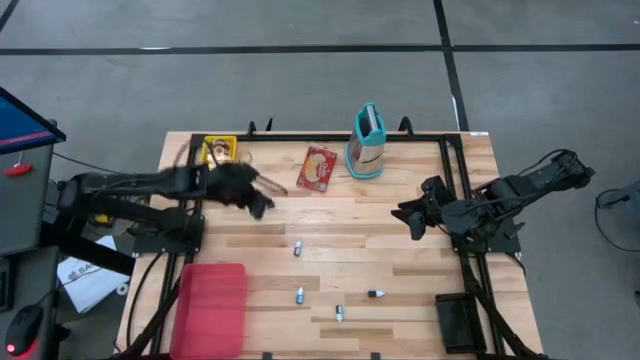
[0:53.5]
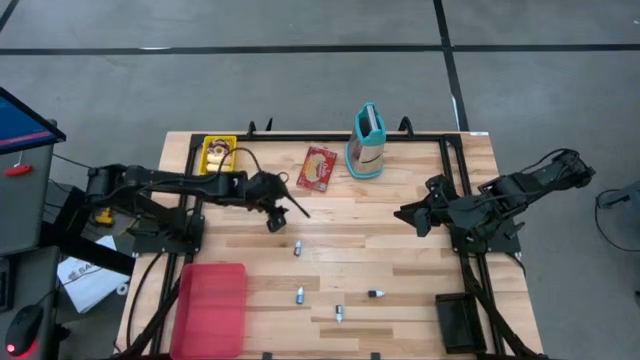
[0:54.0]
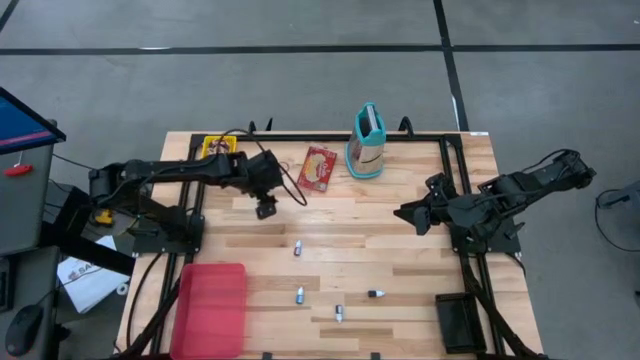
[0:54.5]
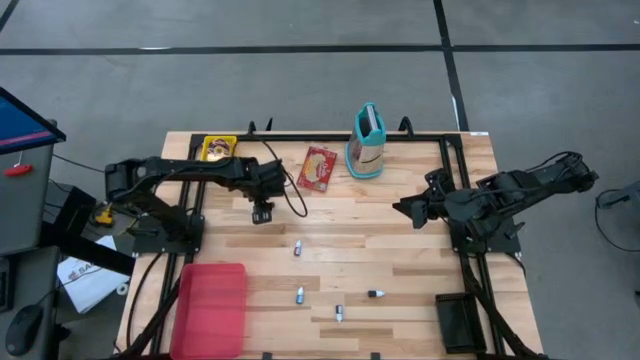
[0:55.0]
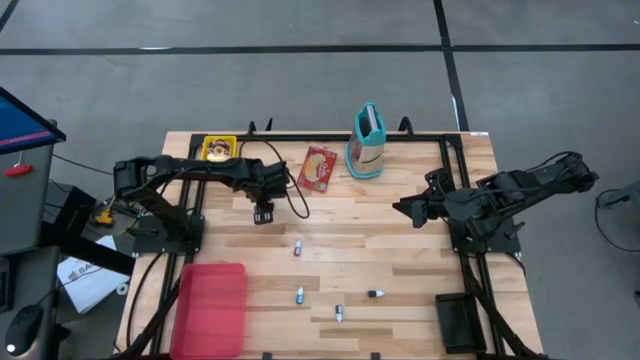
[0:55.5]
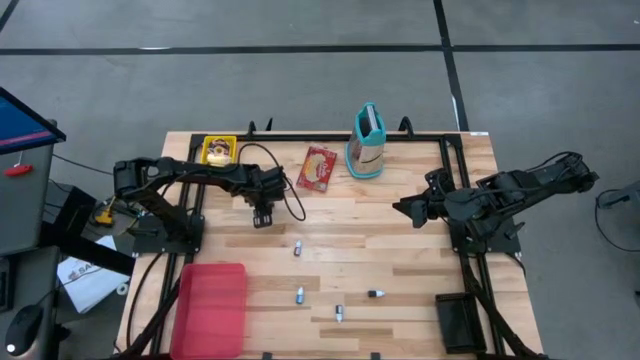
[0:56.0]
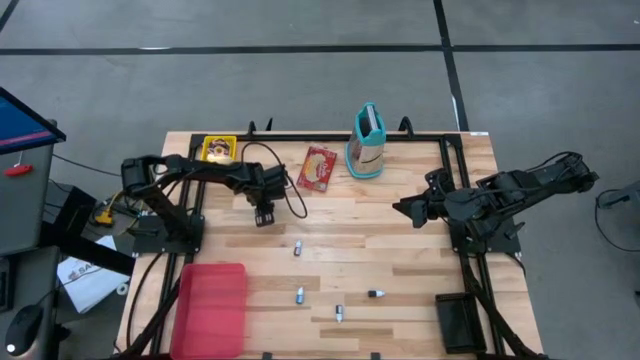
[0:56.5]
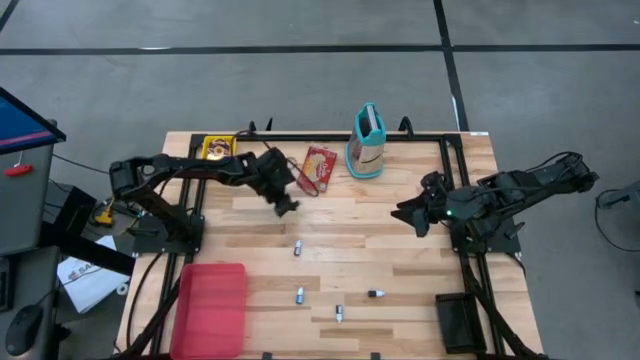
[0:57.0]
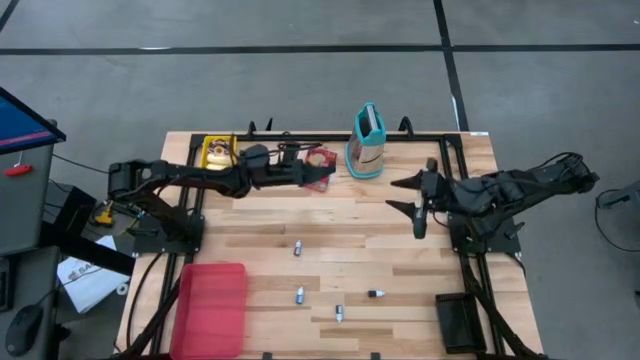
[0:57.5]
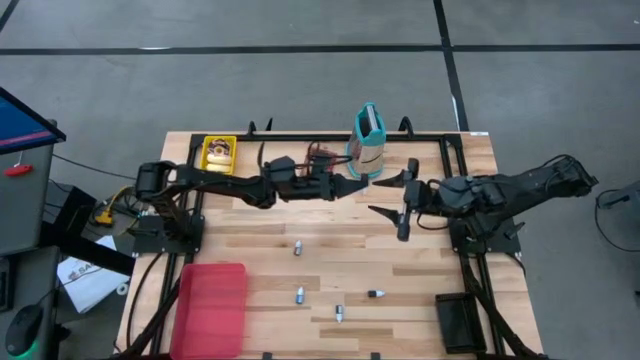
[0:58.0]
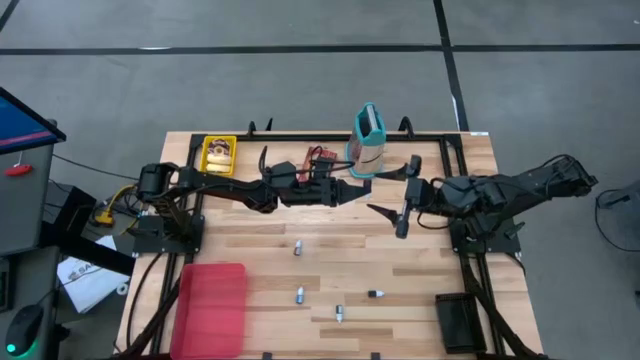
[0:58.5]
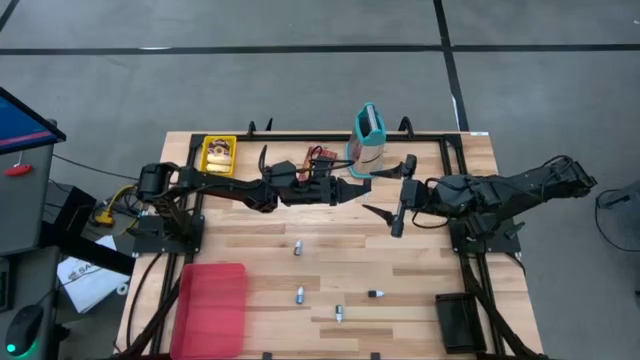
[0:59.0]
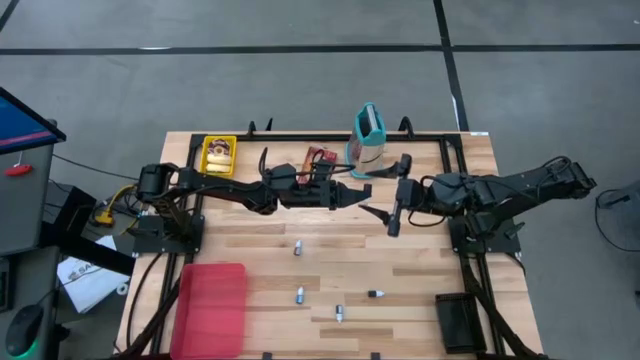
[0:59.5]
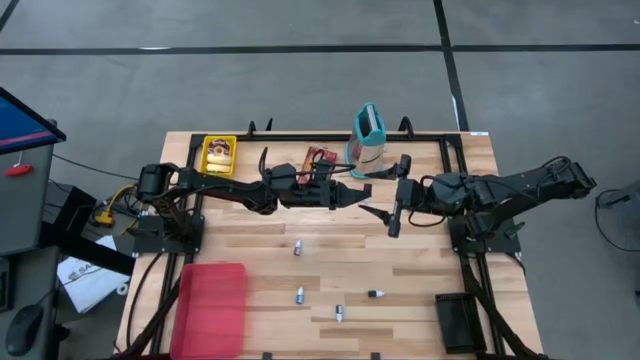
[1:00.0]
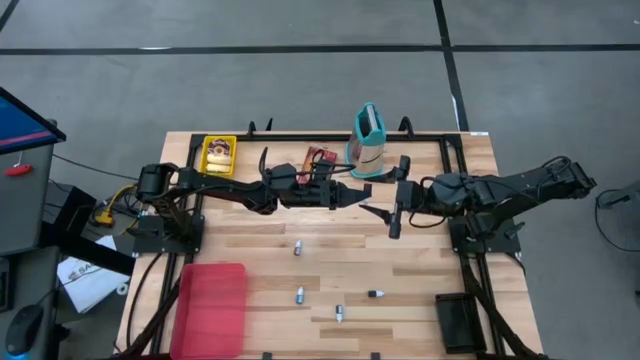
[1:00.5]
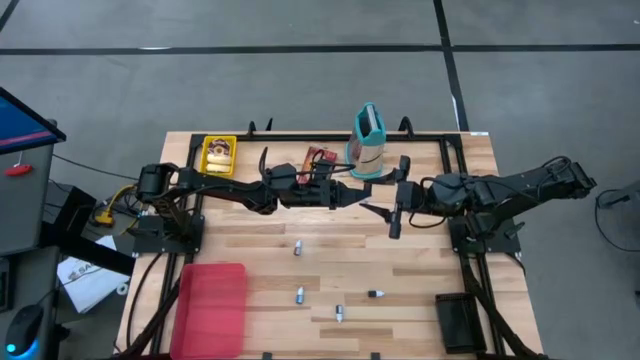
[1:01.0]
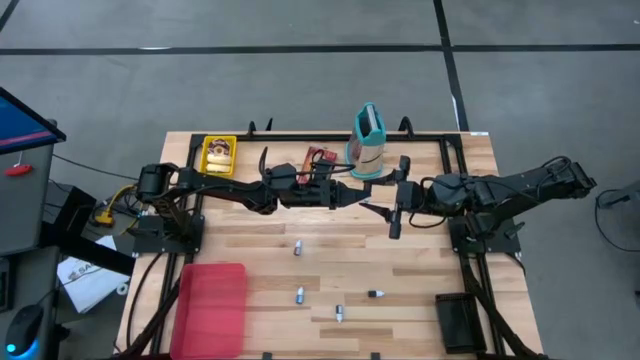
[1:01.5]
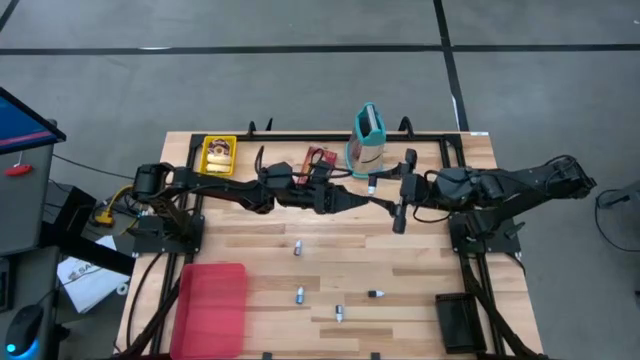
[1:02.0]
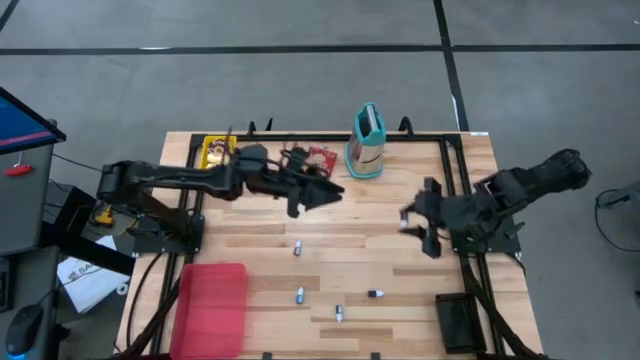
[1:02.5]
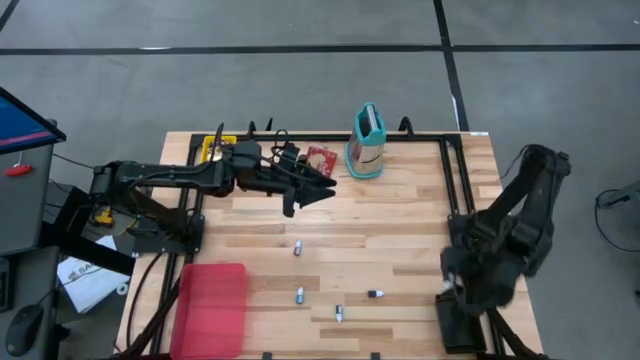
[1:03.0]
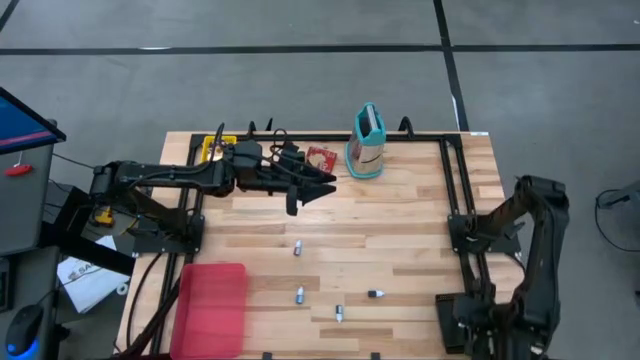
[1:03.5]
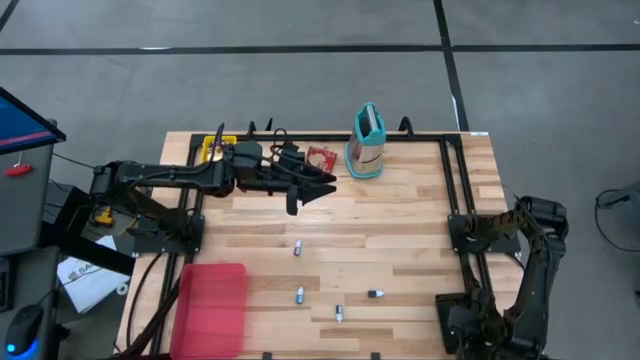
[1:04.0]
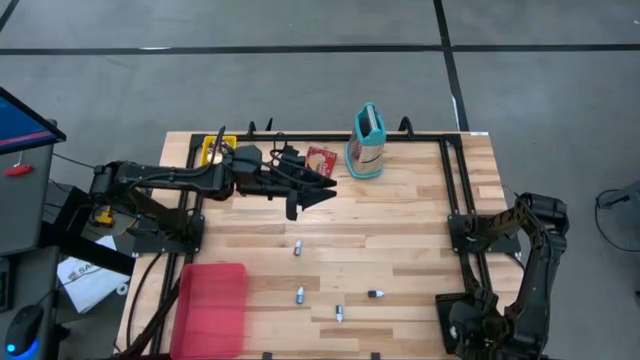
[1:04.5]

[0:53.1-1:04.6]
Put the top red food coloring bottle into the black basket

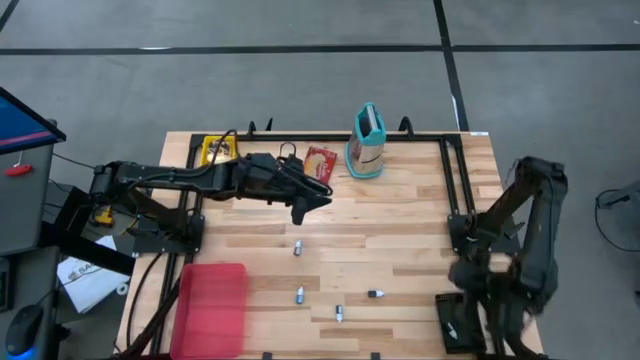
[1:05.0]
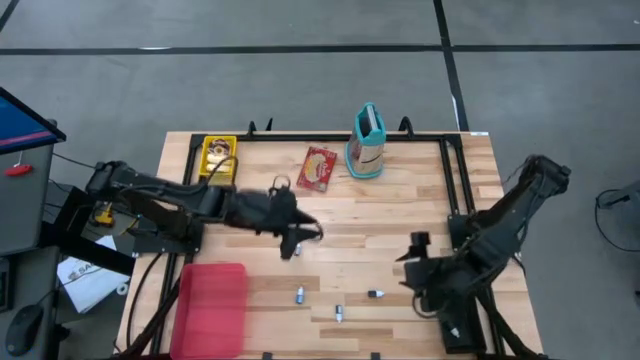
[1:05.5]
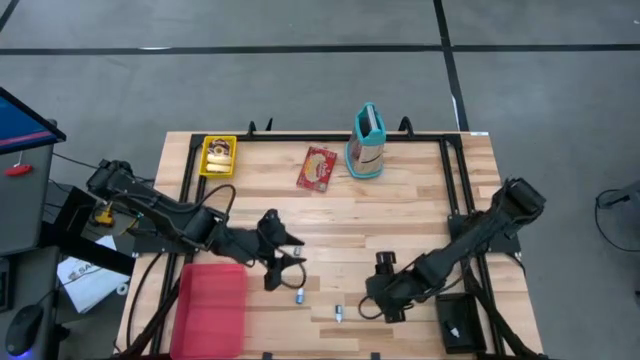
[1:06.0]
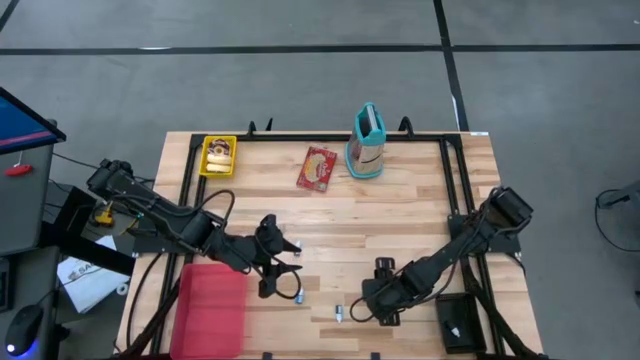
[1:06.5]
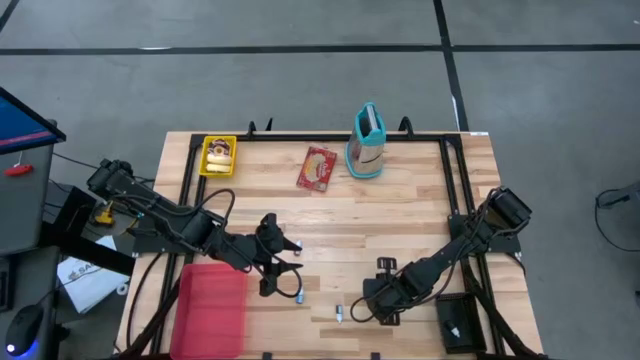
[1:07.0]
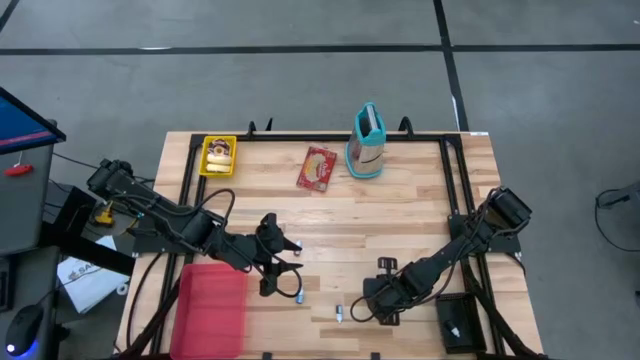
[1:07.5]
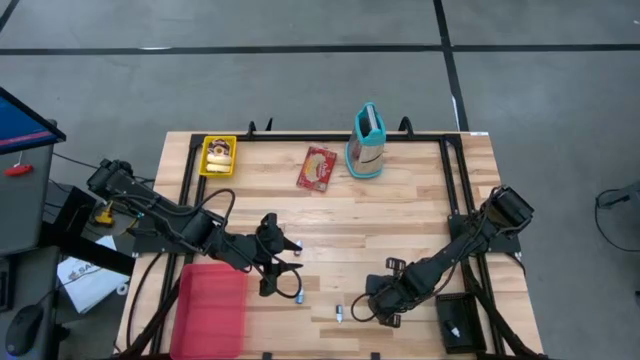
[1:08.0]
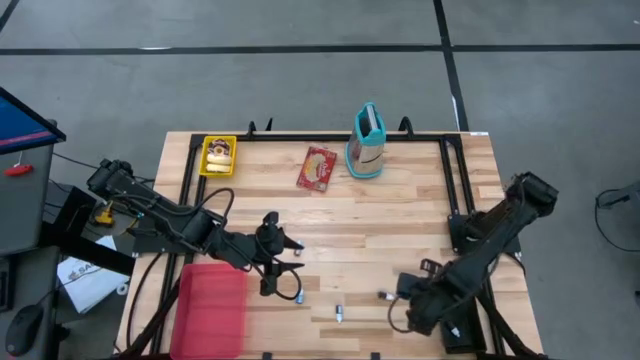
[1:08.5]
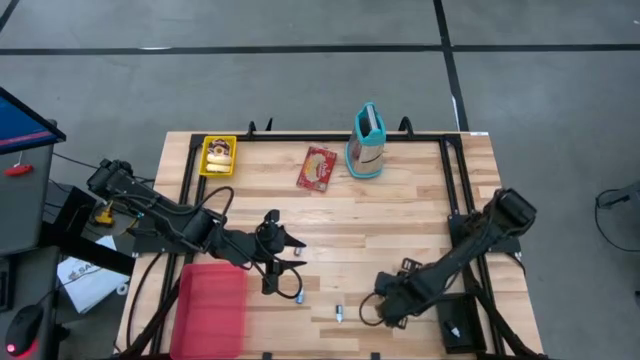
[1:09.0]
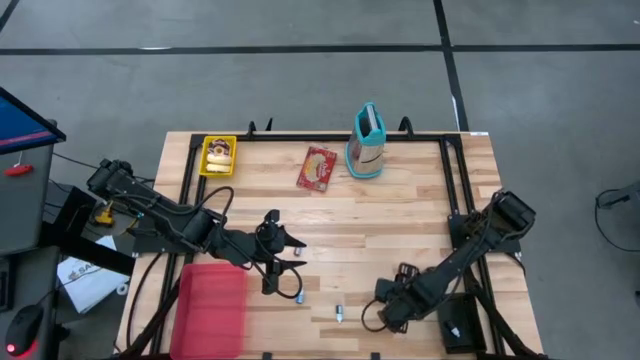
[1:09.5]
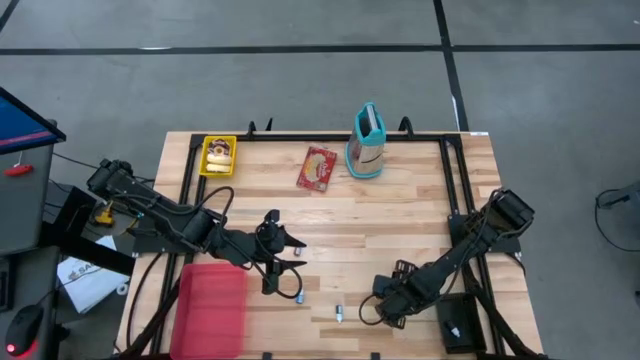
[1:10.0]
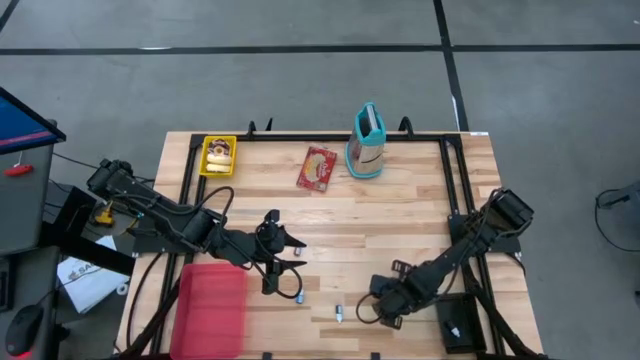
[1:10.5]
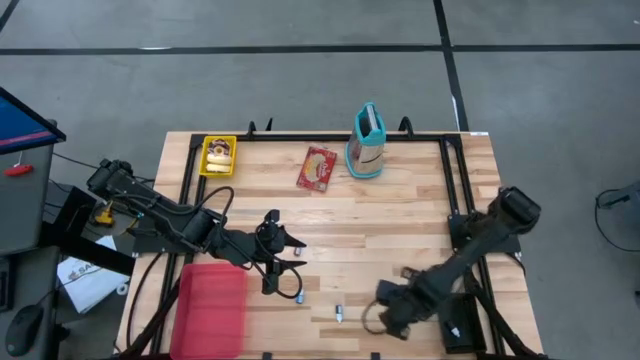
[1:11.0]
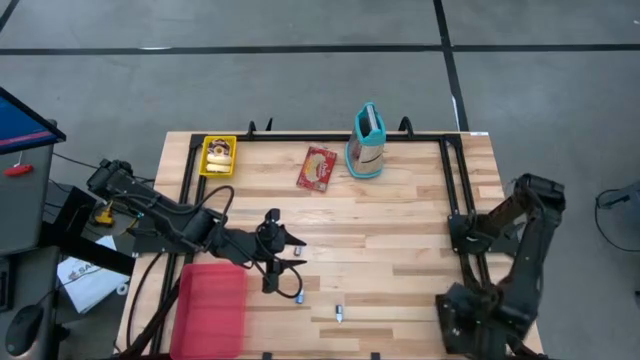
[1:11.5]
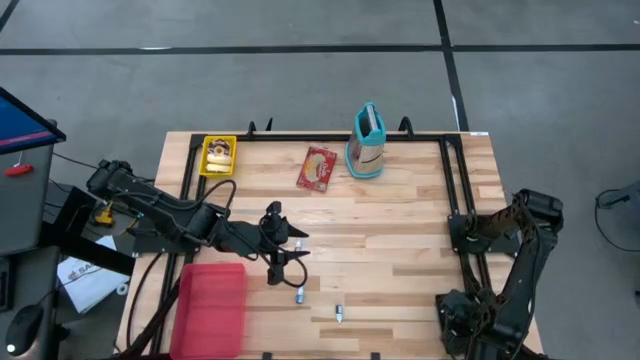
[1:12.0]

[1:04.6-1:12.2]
Put the black food coloring bottle into the black basket

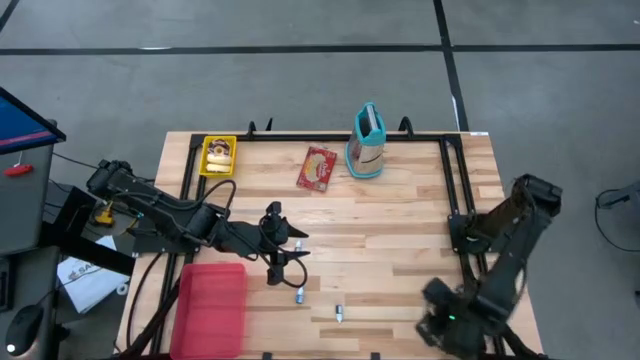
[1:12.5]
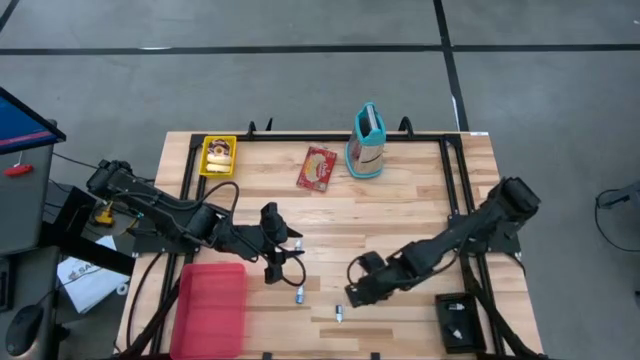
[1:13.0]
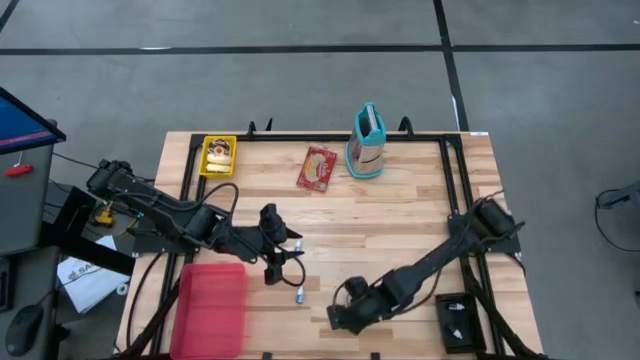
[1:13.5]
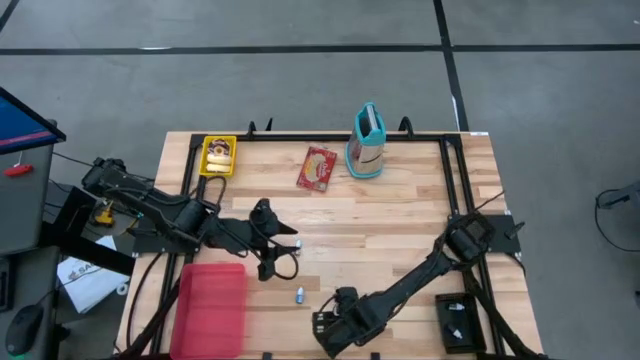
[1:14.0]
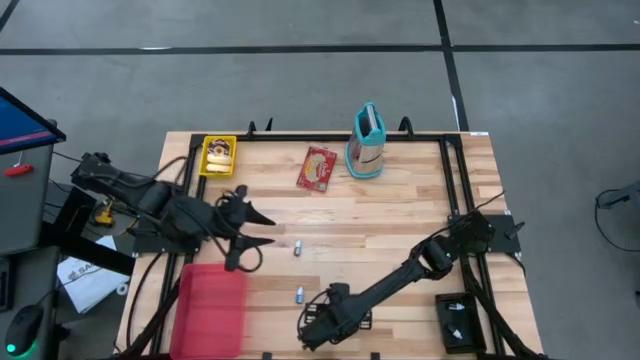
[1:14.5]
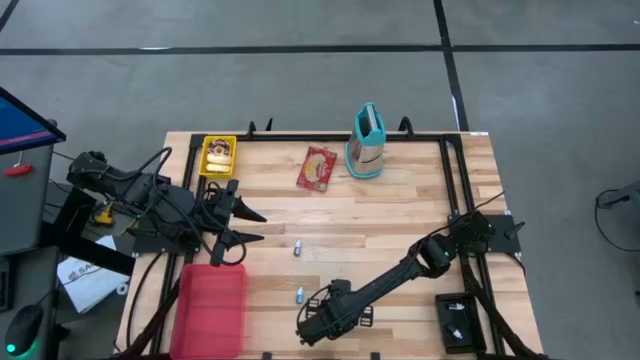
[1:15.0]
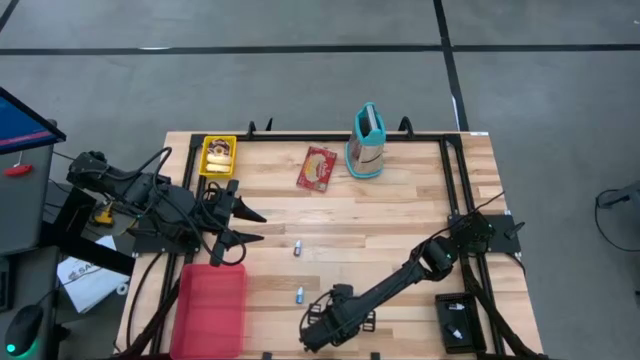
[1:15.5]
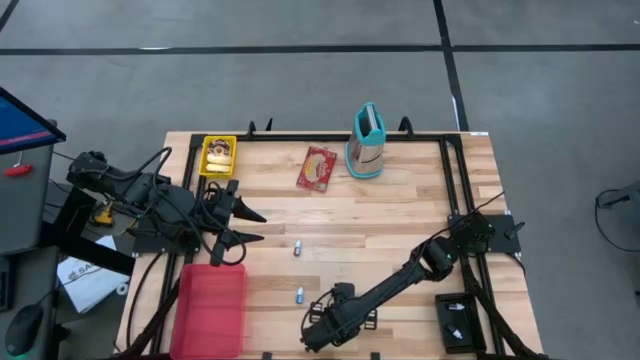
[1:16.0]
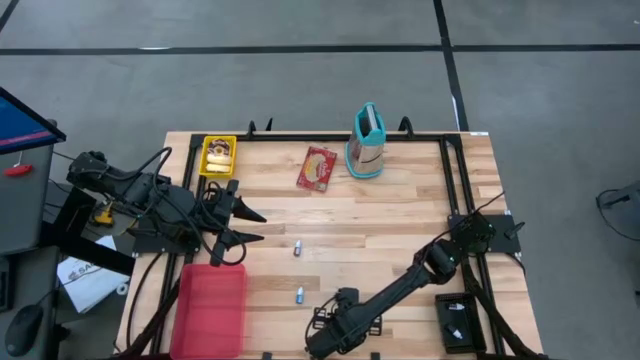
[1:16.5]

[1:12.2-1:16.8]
Put the green food coloring bottle into the black basket
